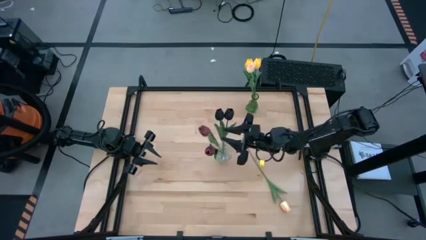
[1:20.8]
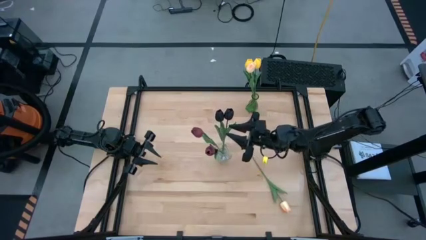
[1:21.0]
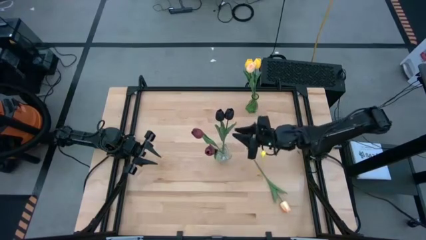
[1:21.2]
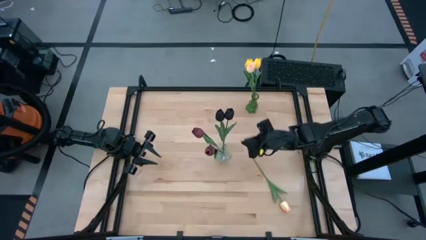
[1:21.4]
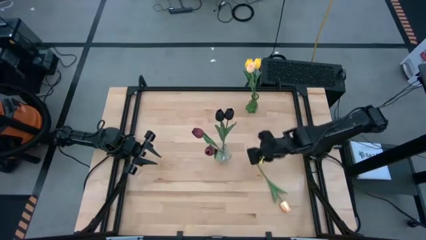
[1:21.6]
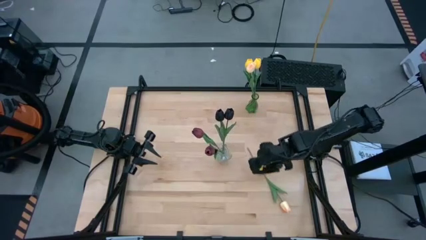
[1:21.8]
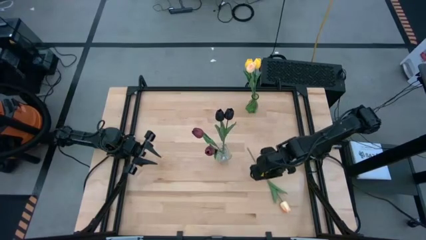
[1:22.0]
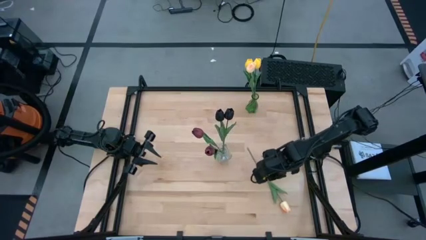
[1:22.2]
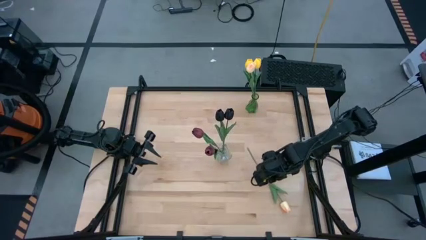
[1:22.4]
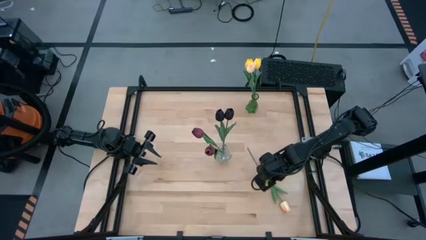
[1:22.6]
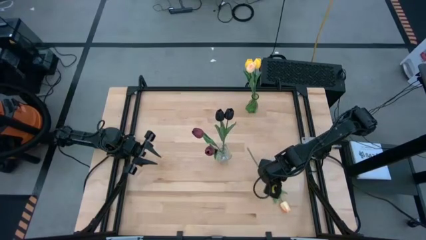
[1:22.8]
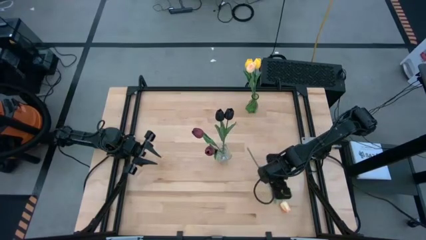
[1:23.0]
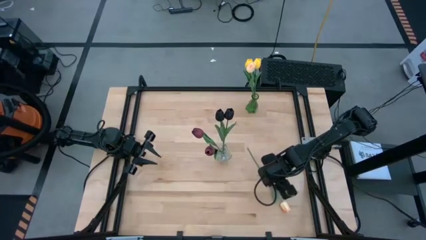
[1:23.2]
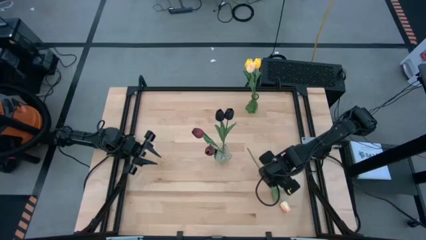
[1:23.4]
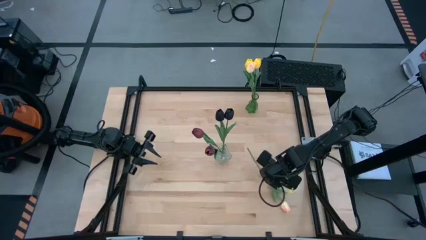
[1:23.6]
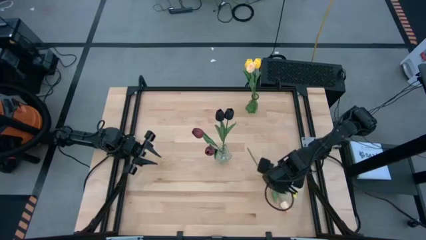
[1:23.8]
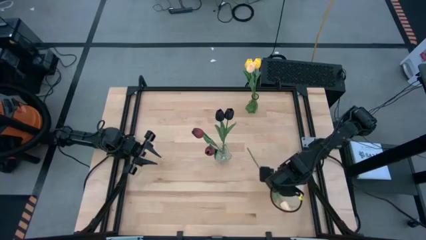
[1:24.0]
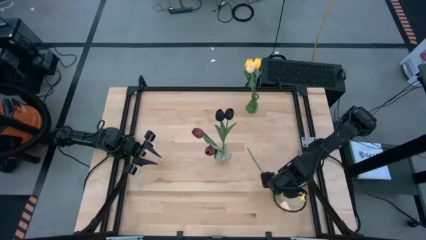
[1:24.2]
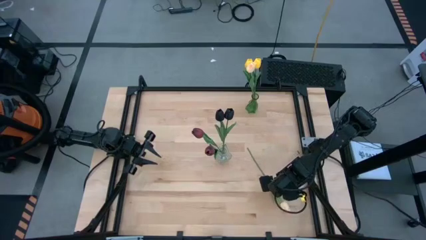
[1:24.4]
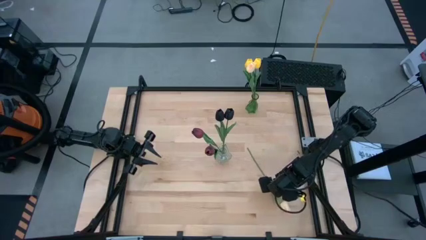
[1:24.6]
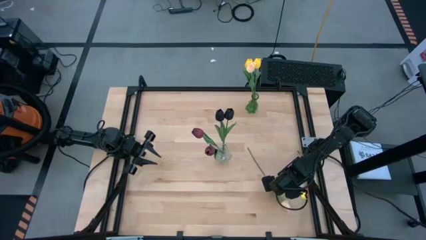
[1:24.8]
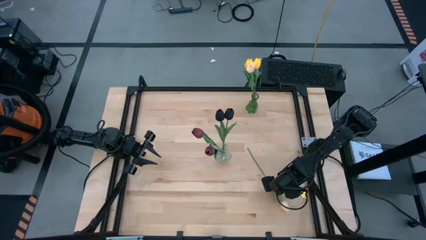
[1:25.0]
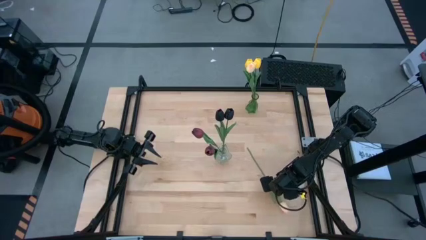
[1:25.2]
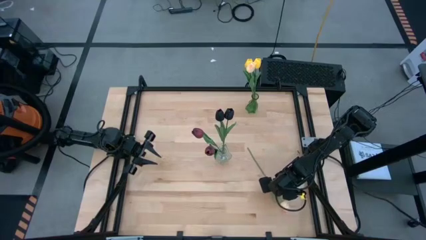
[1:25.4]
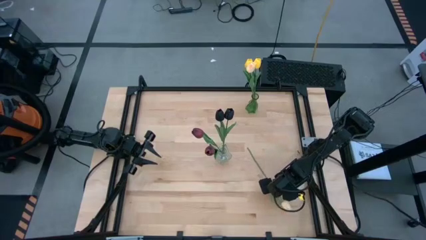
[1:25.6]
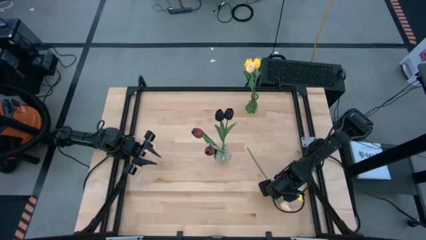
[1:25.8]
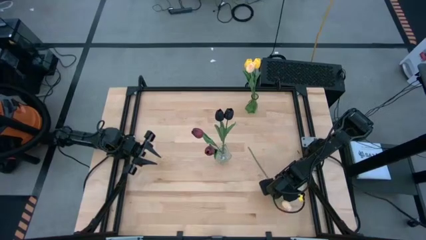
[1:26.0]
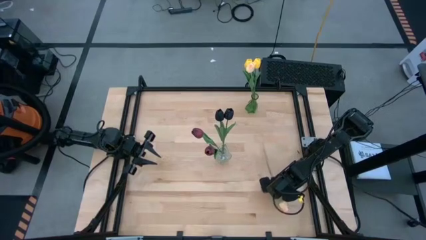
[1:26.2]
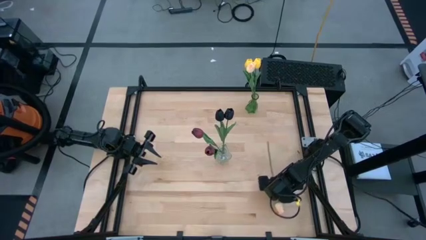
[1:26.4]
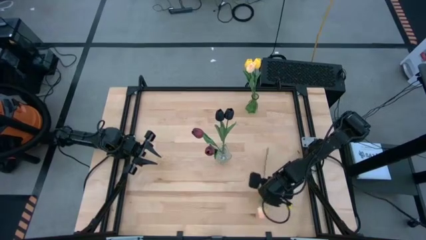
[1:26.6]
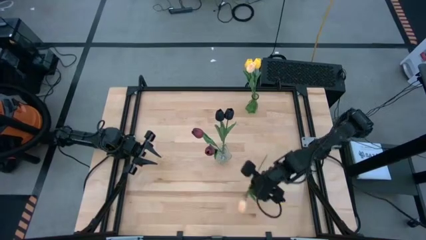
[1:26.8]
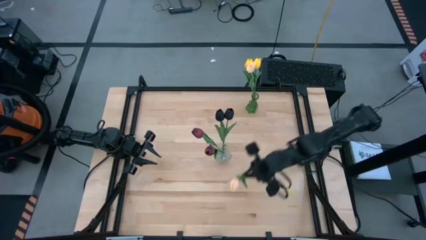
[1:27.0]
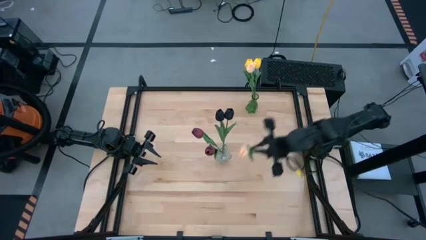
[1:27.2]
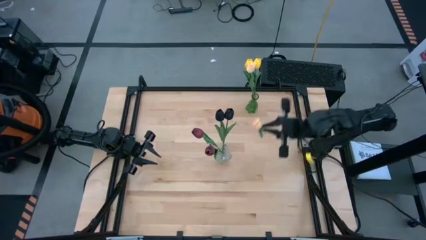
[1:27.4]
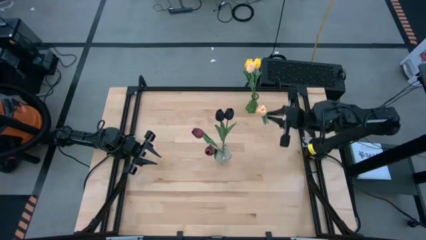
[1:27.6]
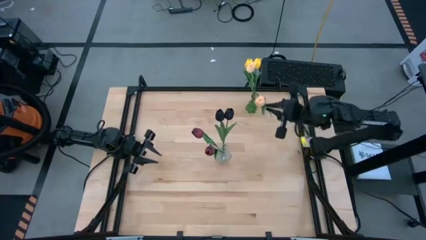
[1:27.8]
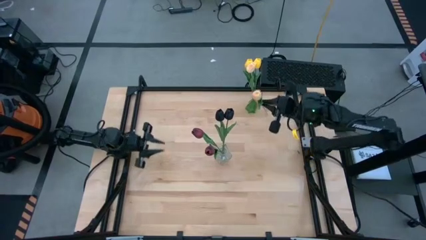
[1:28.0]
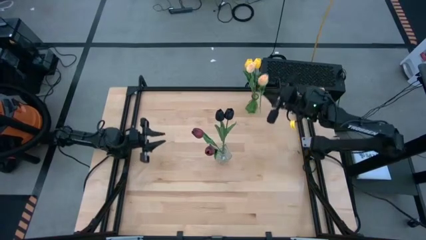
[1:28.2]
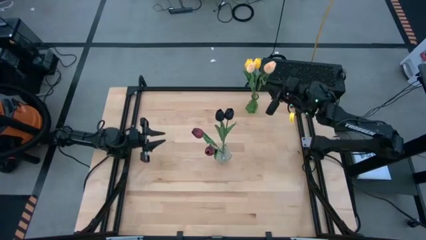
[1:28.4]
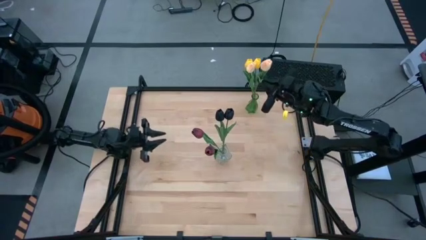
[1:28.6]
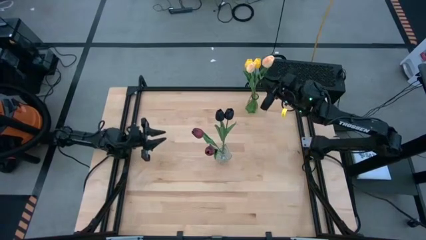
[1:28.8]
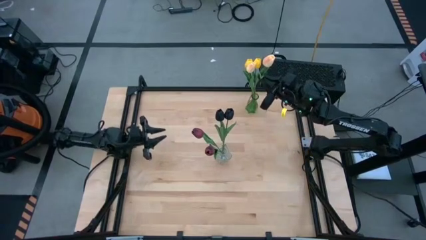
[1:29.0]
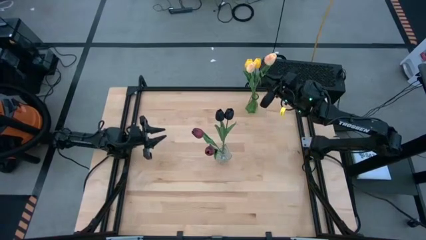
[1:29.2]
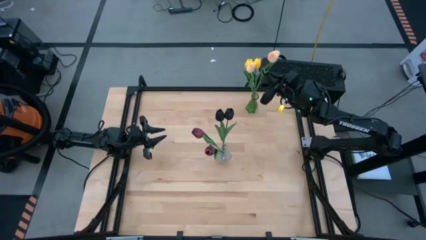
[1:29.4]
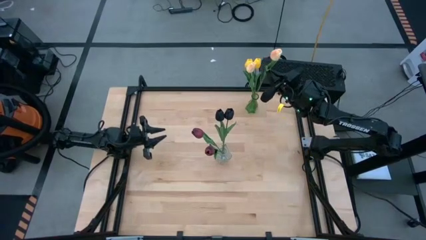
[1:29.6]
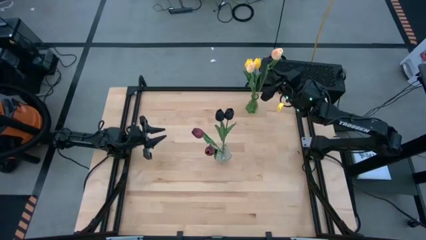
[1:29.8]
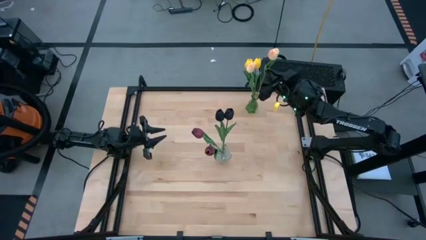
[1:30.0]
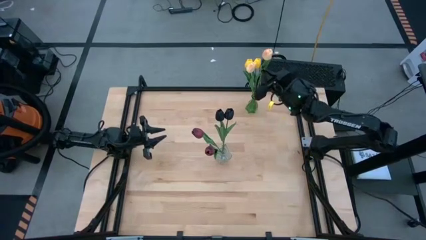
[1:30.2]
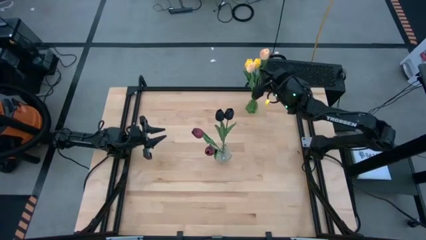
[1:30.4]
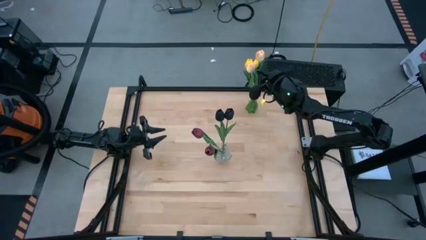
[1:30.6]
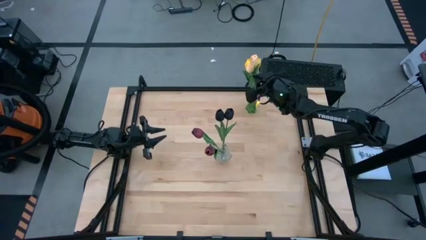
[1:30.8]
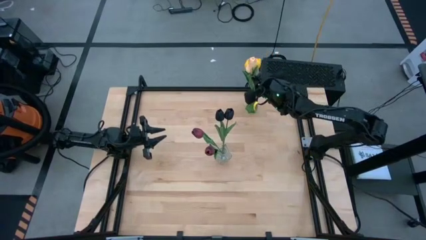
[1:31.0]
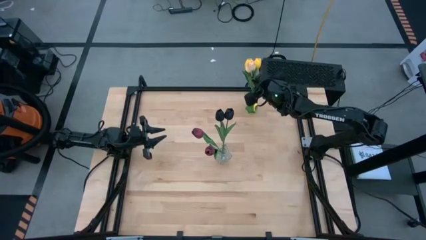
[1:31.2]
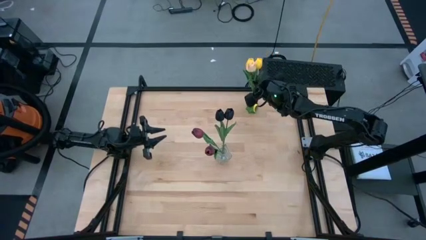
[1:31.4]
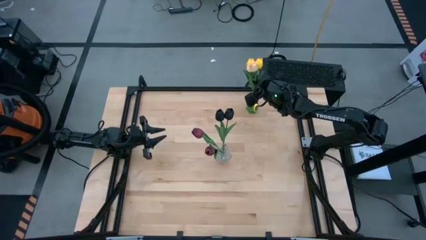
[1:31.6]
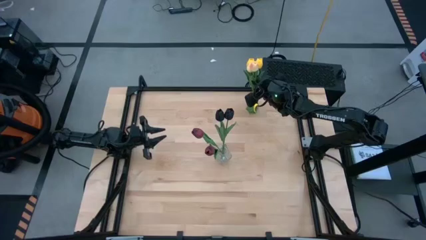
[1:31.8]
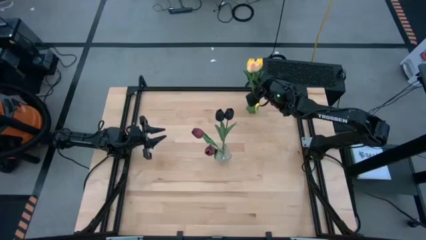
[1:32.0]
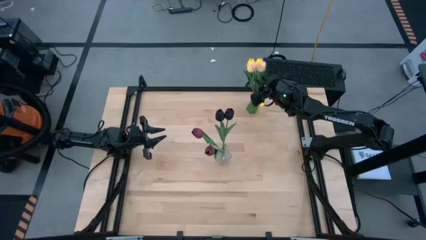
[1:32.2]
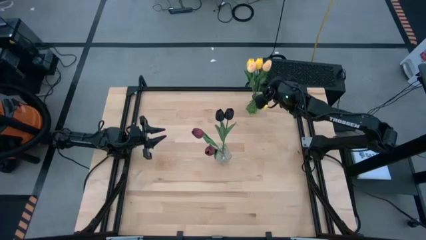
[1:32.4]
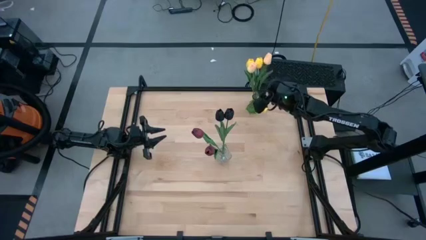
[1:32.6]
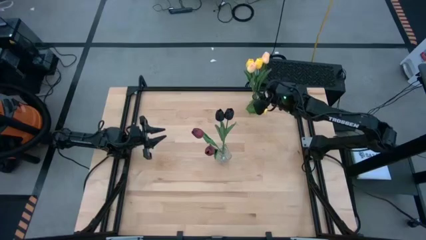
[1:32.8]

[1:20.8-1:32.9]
Task: Sort flowers into vase by color
Put the light pink tulip into the green vase

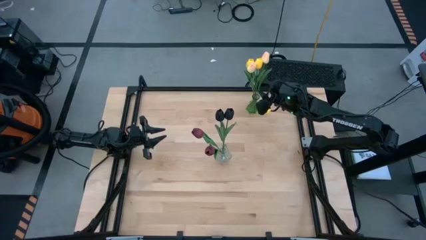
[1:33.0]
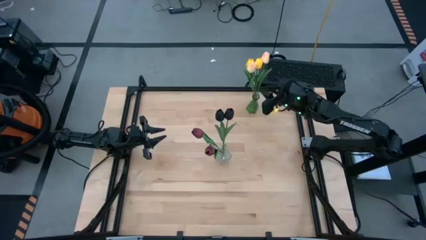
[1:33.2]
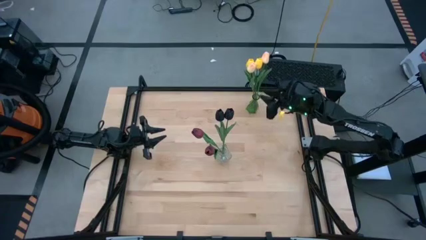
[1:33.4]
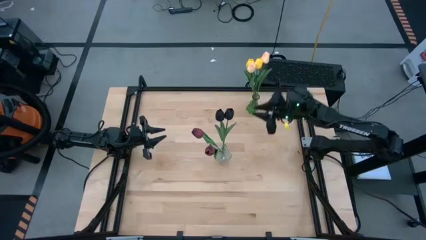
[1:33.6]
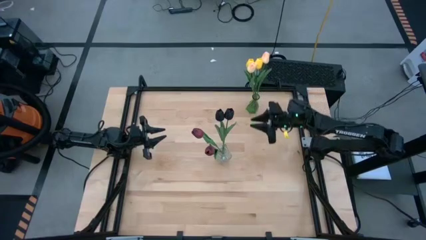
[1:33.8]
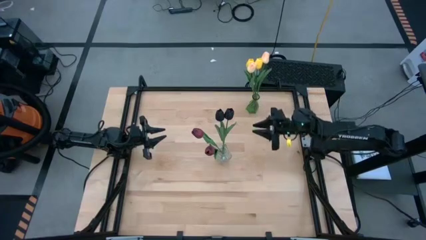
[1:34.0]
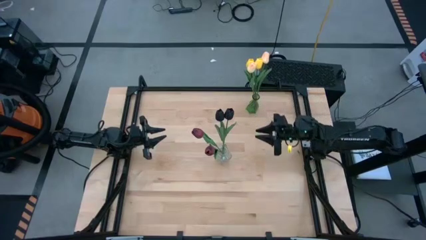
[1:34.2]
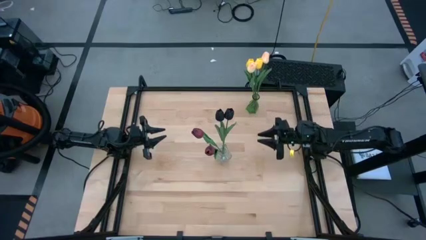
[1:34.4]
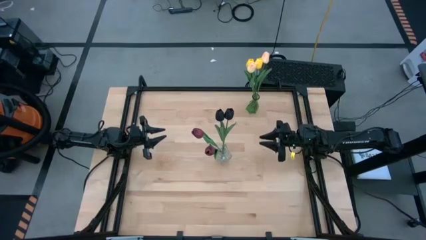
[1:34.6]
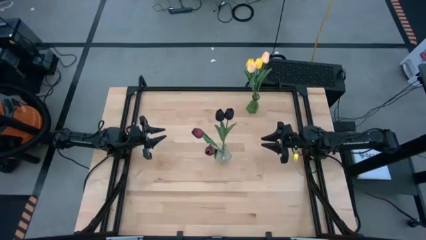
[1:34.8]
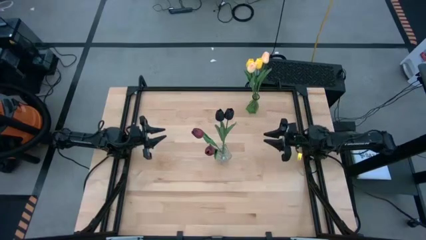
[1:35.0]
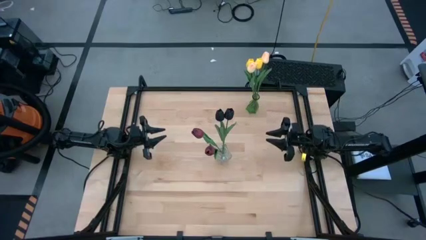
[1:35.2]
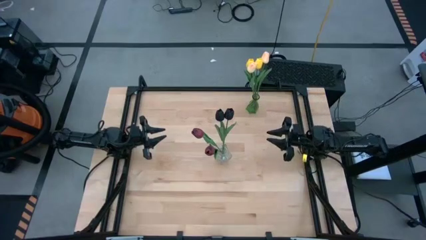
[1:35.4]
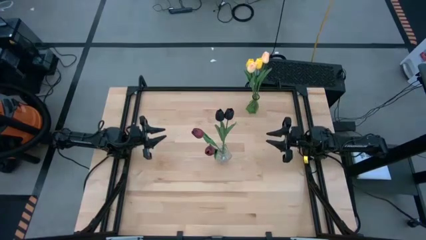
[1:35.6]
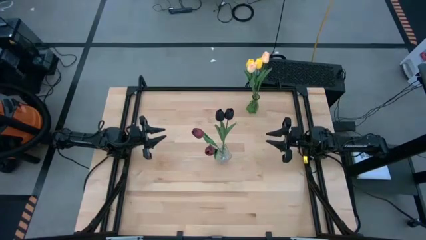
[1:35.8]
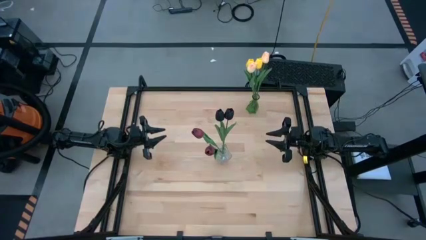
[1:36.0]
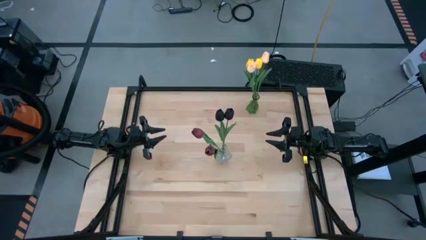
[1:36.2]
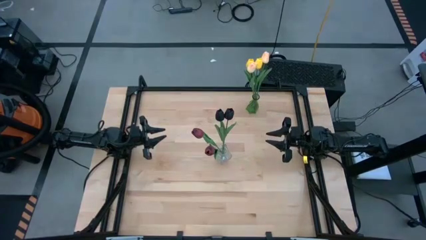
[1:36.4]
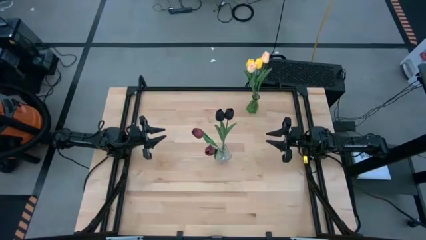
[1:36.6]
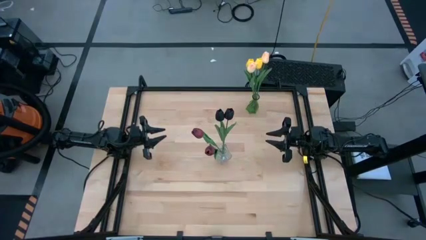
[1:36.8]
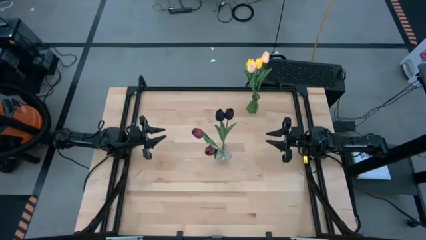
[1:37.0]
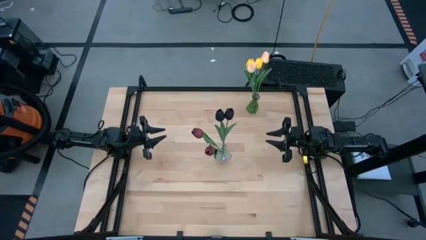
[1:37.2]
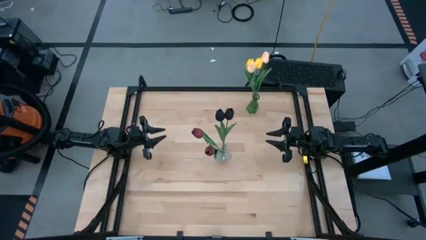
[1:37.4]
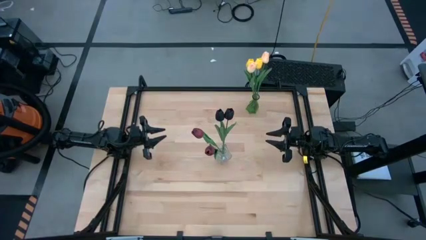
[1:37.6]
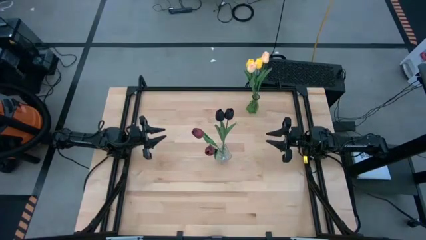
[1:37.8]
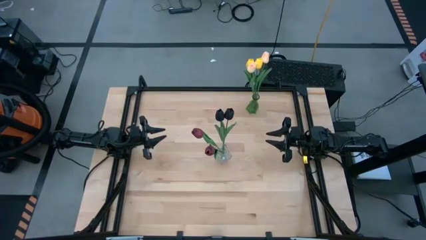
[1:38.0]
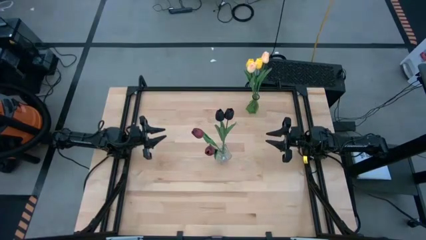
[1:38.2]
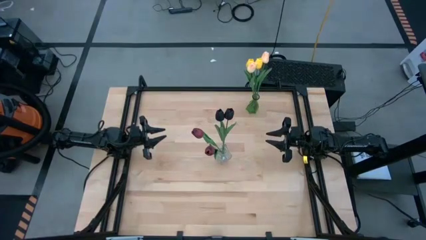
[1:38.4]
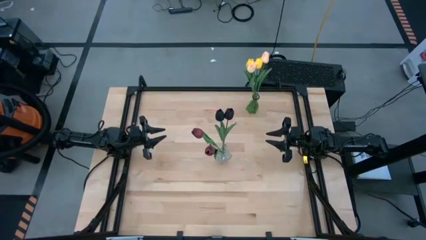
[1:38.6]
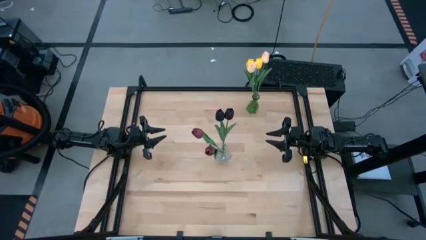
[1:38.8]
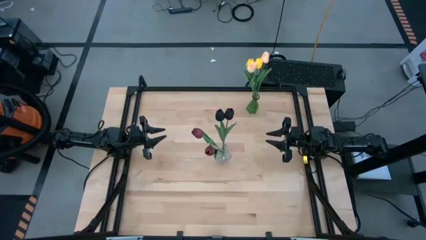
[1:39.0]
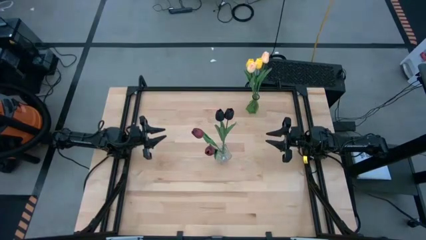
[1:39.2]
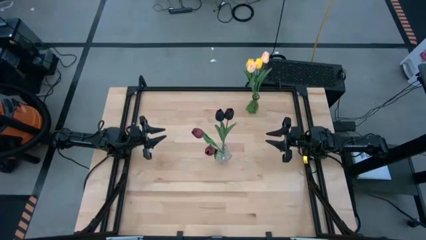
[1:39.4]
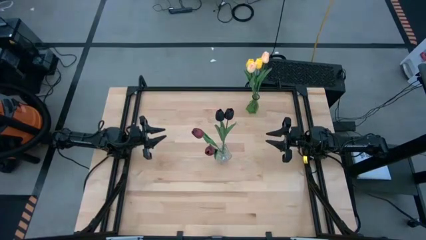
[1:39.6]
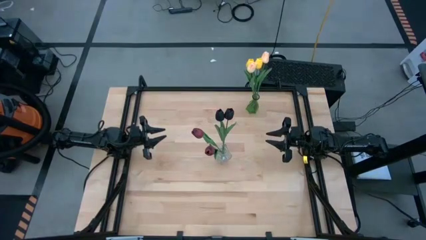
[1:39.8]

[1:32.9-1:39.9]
Return to Home Position
